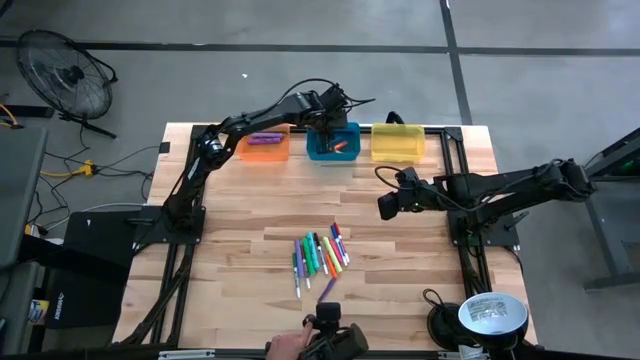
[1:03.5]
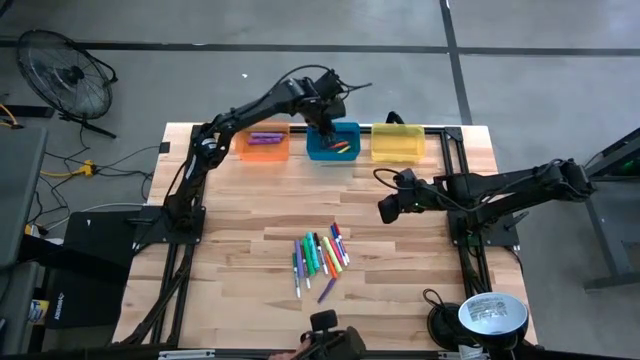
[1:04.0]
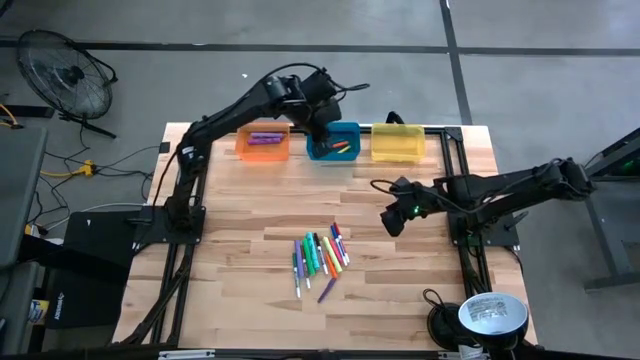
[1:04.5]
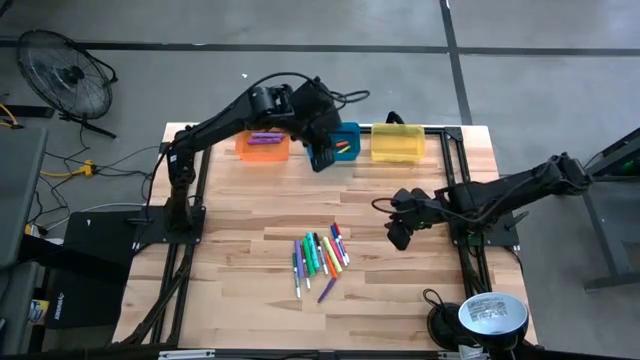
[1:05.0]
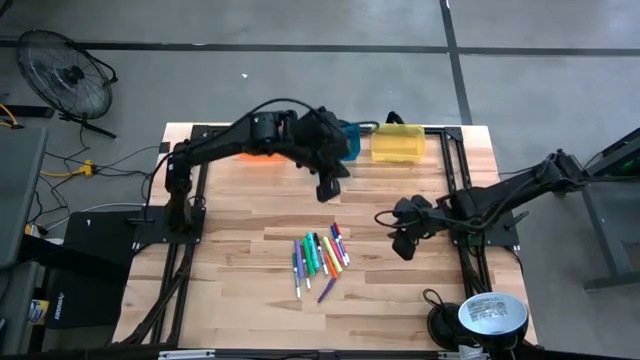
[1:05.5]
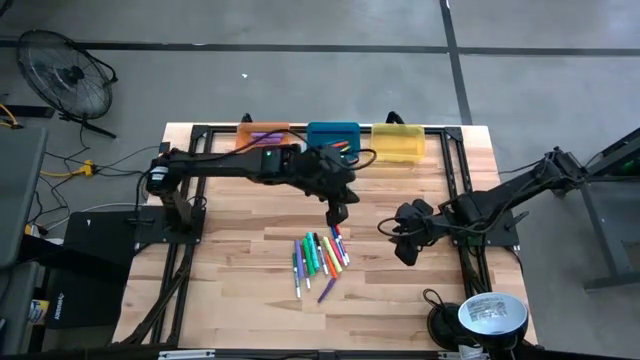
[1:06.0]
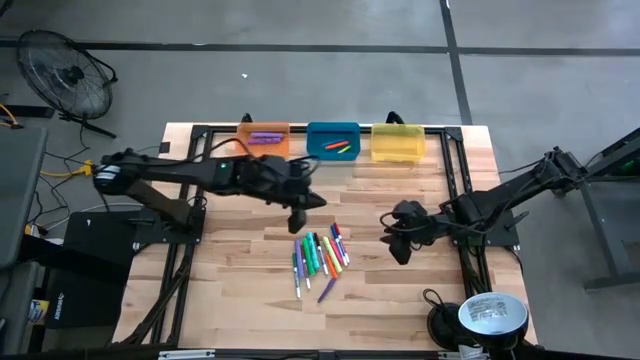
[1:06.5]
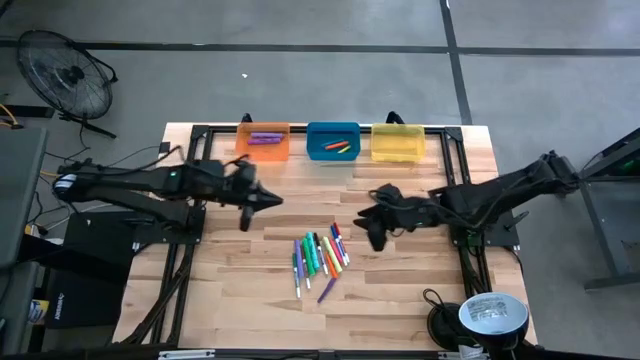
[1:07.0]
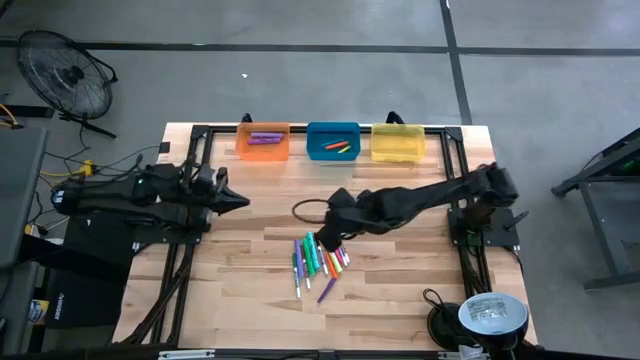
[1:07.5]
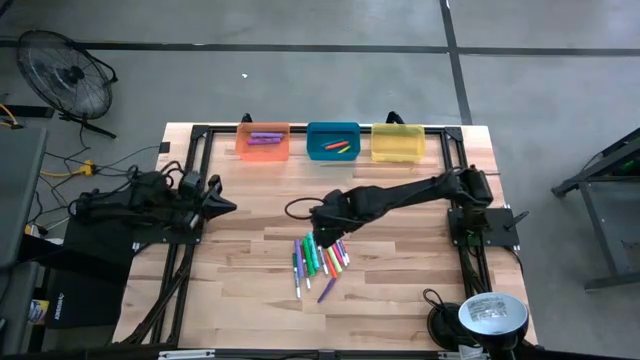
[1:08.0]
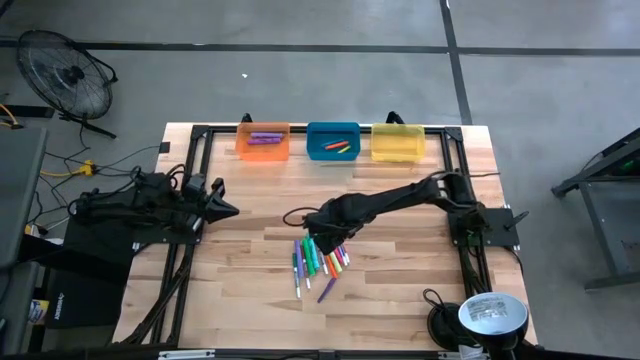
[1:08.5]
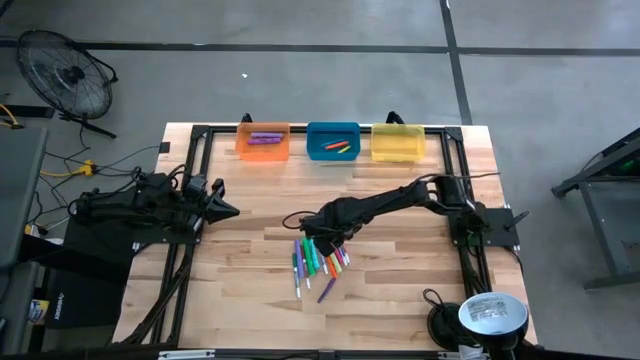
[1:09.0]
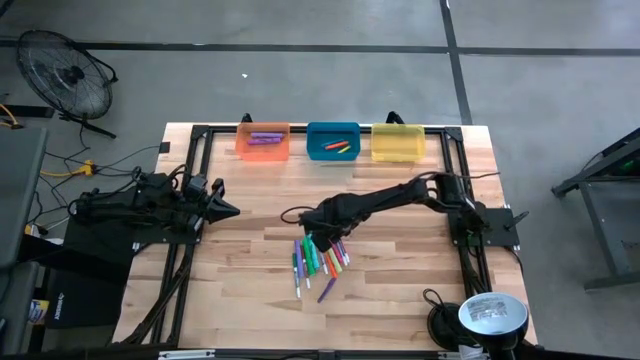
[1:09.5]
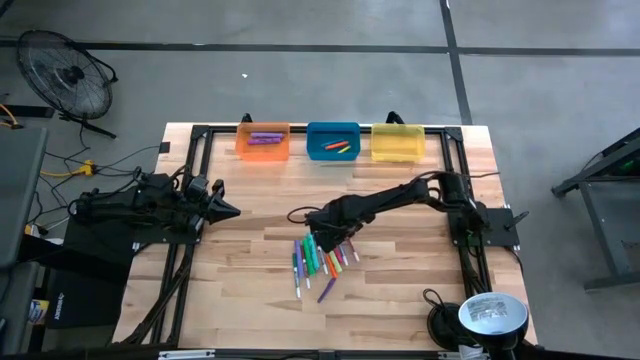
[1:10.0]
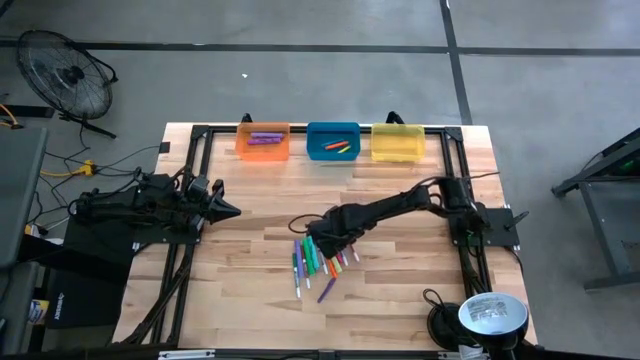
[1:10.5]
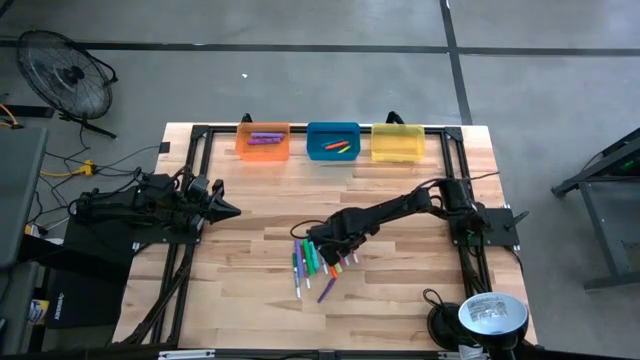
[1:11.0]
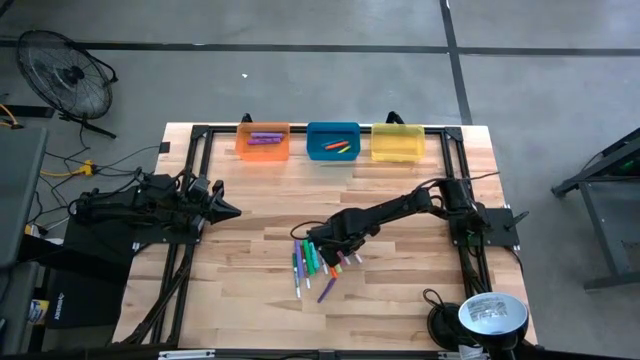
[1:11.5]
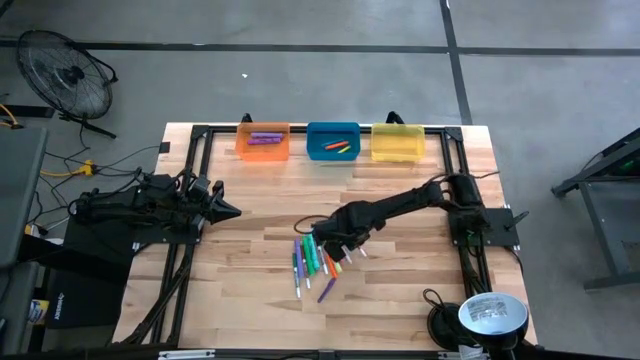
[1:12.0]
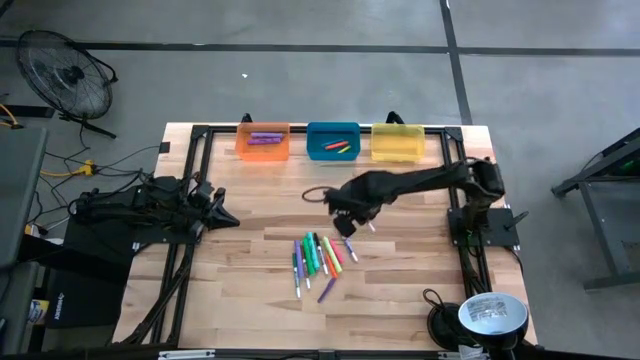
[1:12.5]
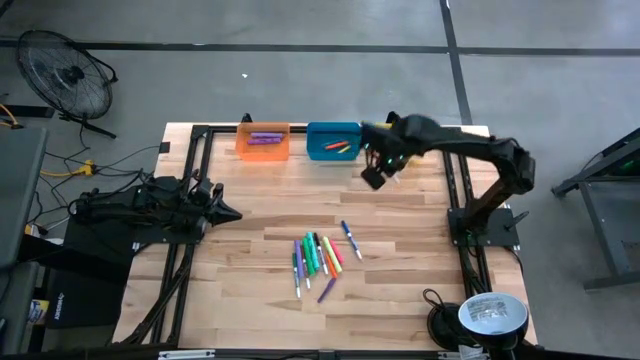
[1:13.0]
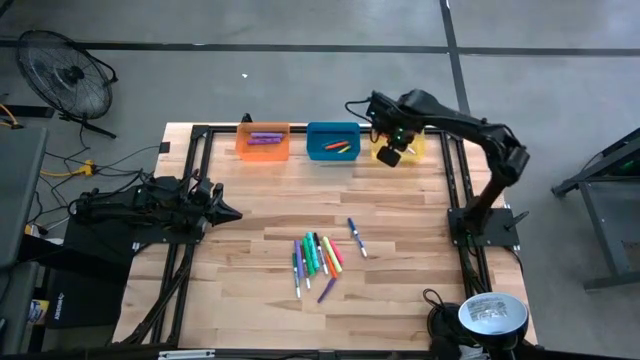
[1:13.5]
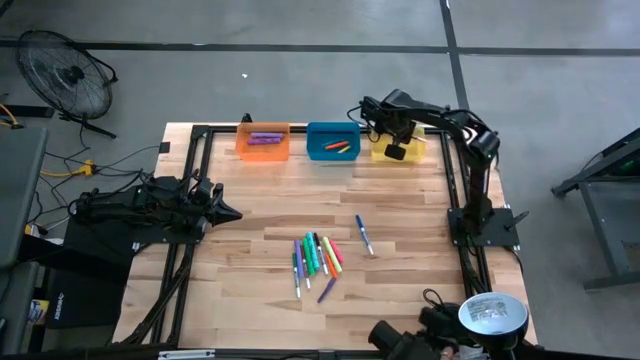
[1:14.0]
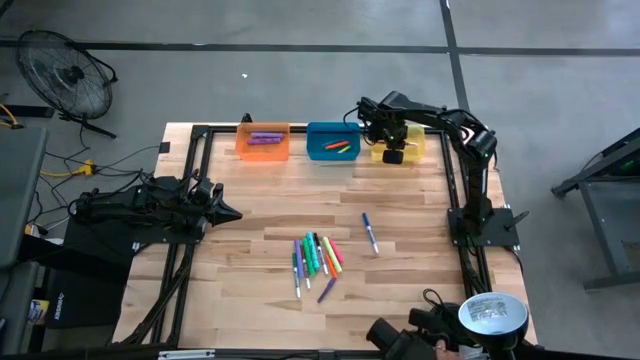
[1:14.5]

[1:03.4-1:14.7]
Task: Pick & Place Markers
Put the red marker into the yellow bin

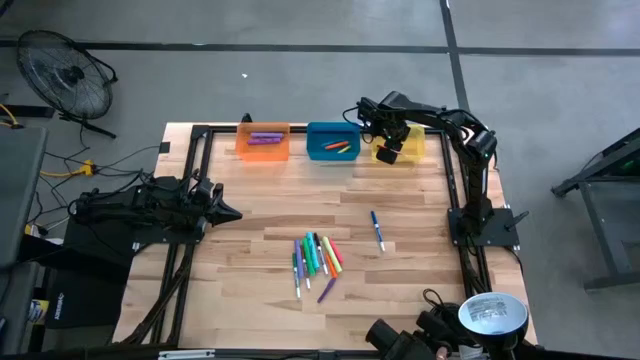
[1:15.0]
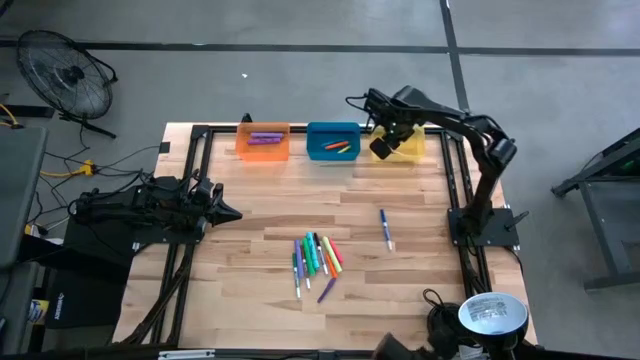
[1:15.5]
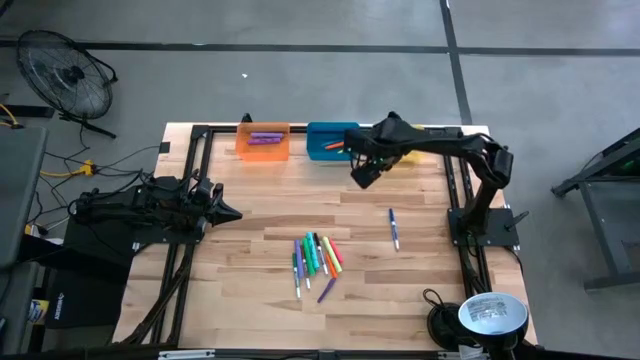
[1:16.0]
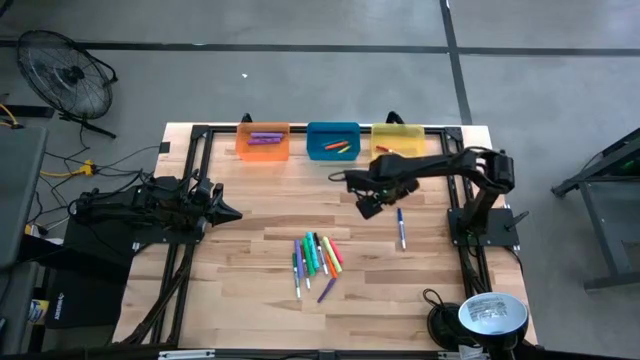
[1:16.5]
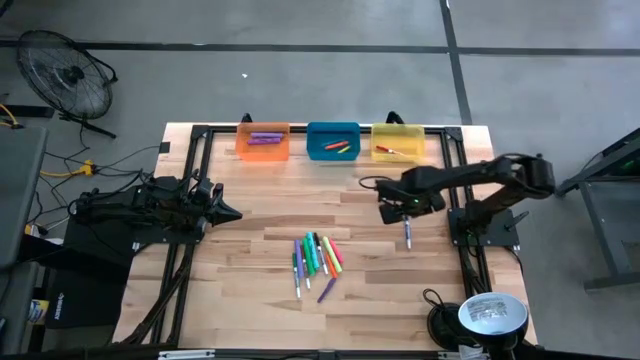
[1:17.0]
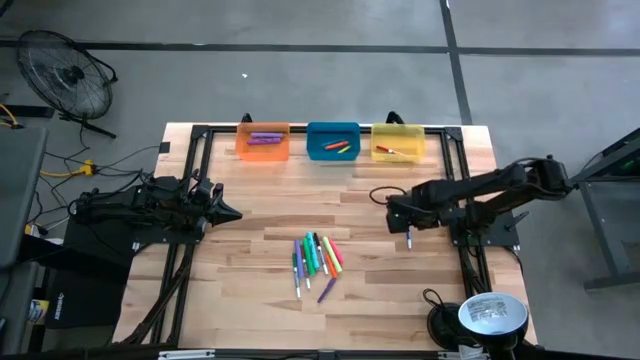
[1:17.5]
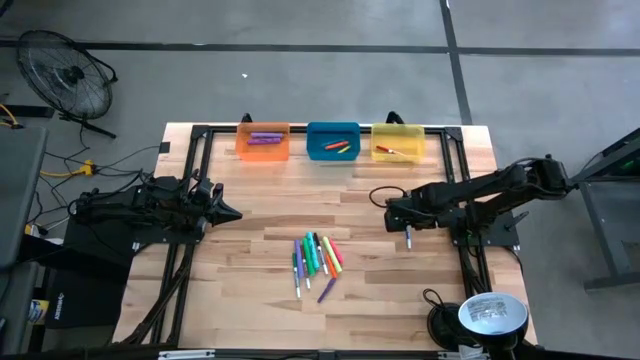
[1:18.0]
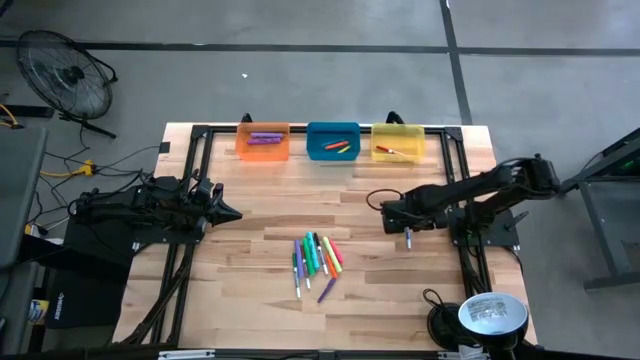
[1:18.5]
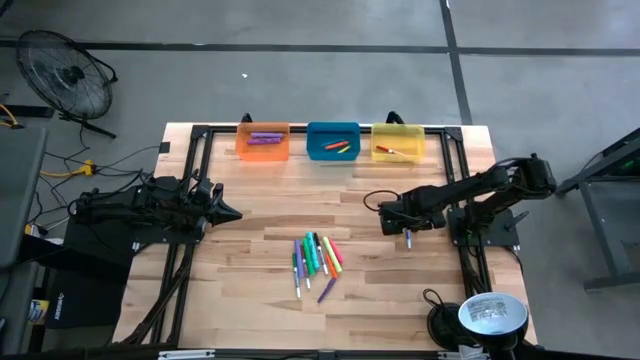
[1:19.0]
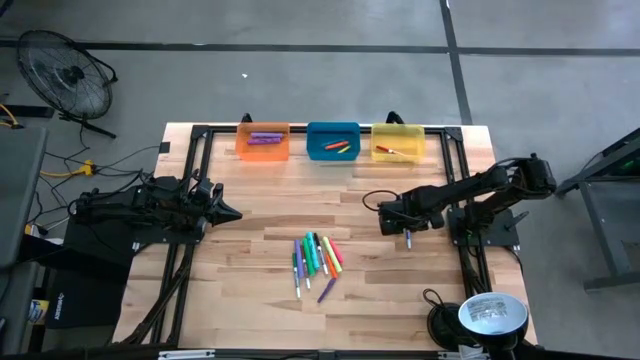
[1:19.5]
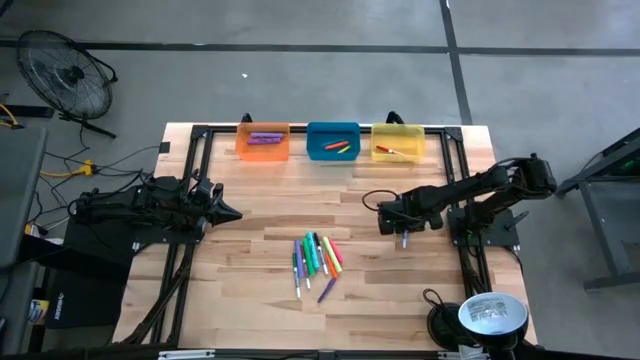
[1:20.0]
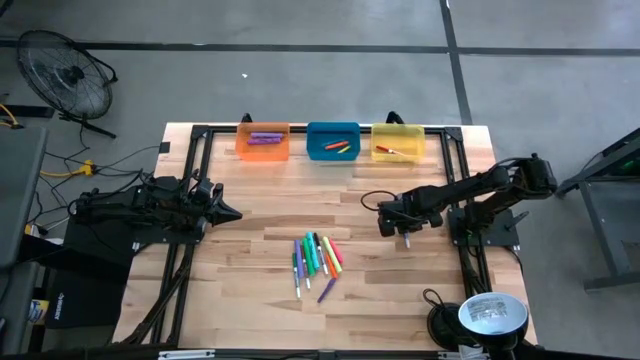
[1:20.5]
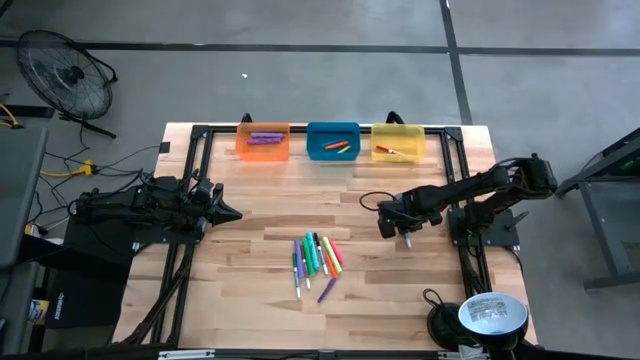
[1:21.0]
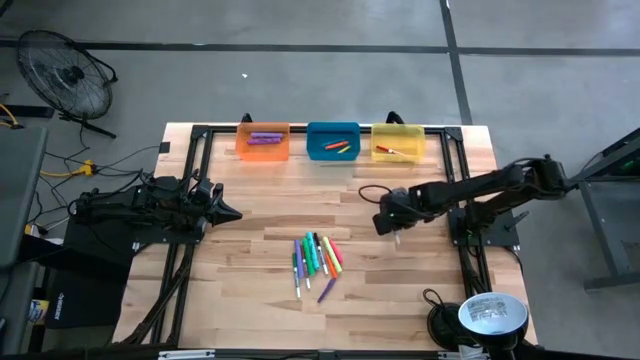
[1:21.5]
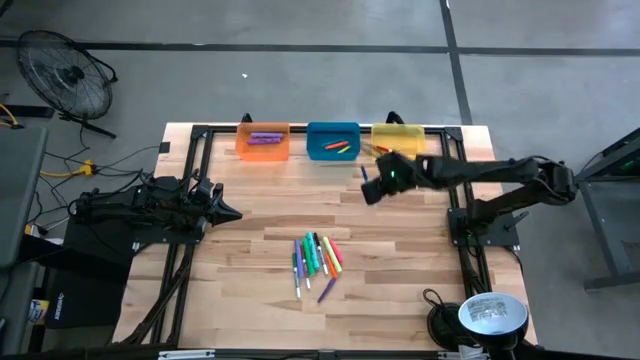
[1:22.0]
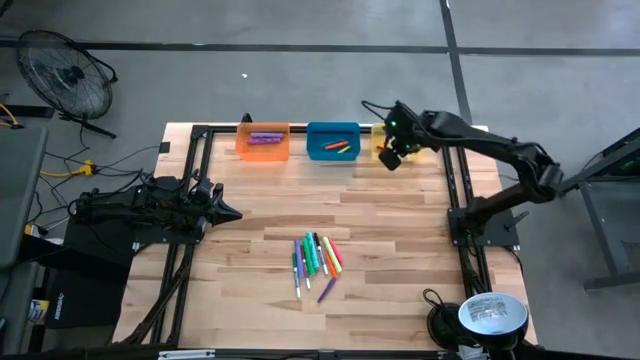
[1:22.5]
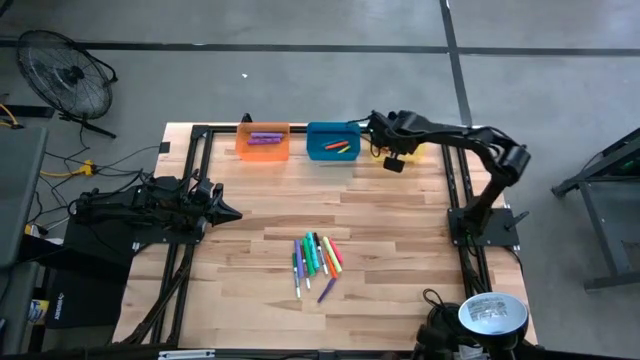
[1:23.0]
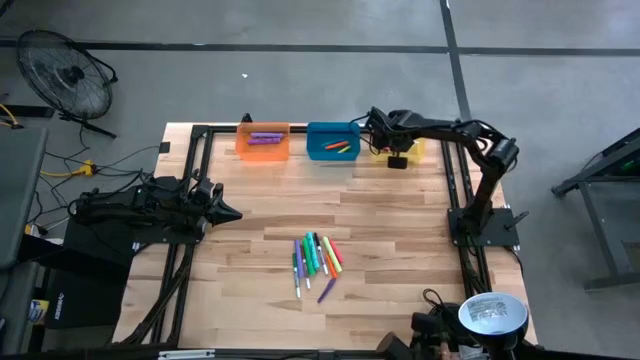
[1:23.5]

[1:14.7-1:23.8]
Put the blue marker into the yellow bin
